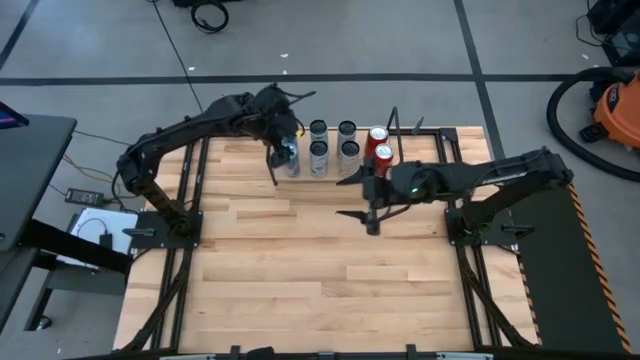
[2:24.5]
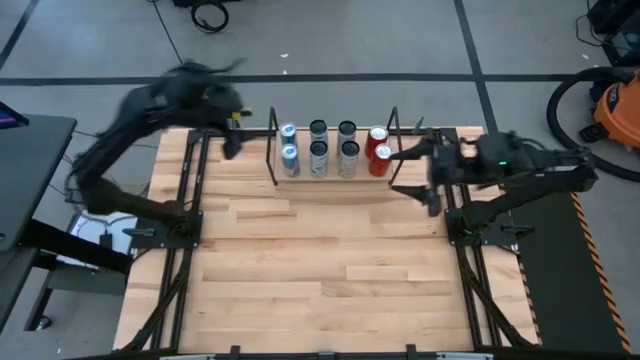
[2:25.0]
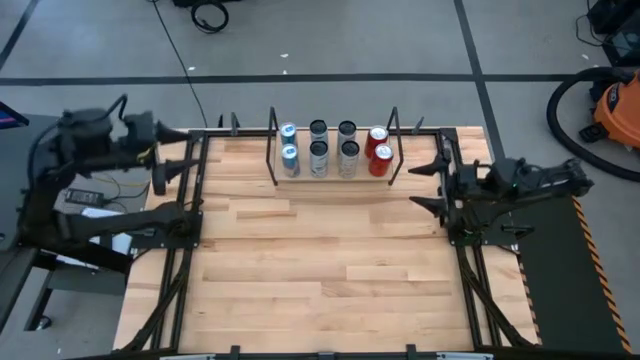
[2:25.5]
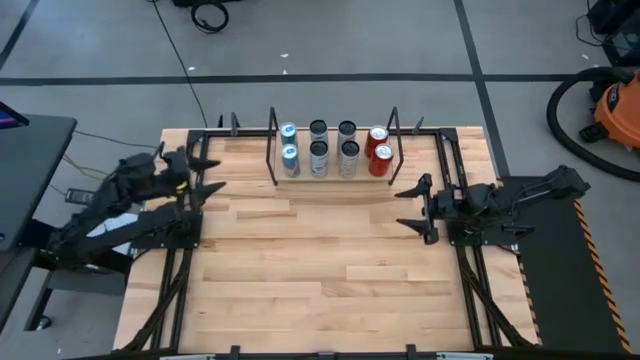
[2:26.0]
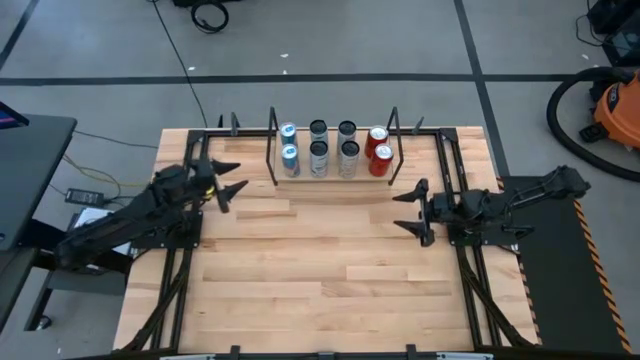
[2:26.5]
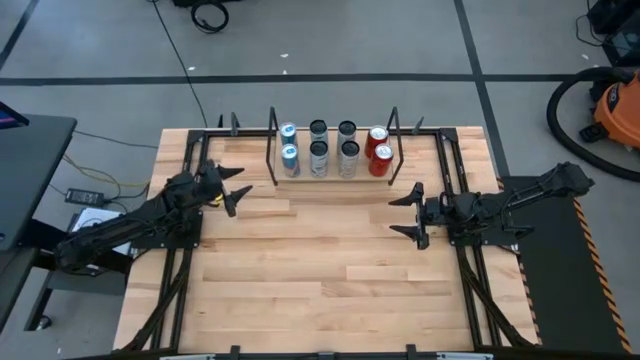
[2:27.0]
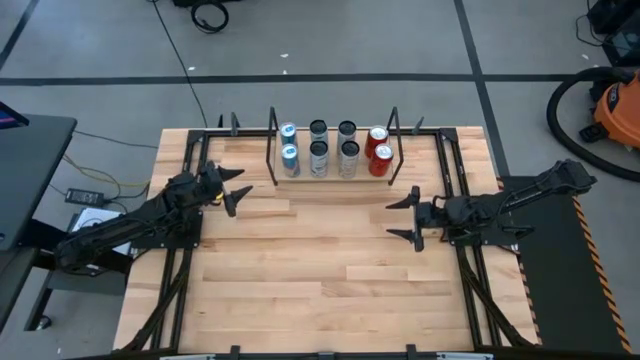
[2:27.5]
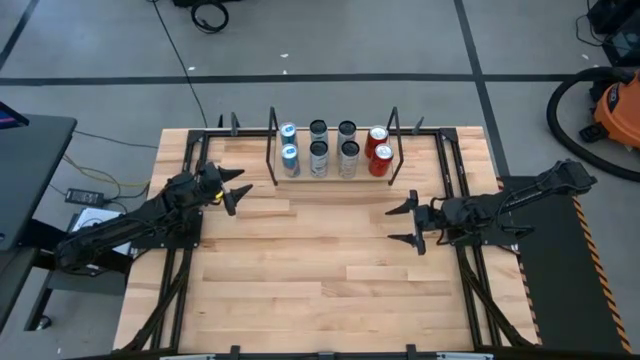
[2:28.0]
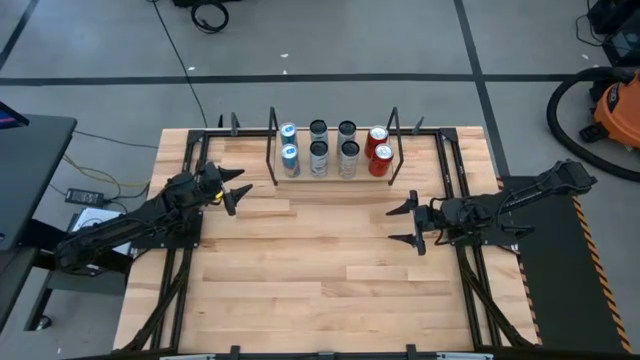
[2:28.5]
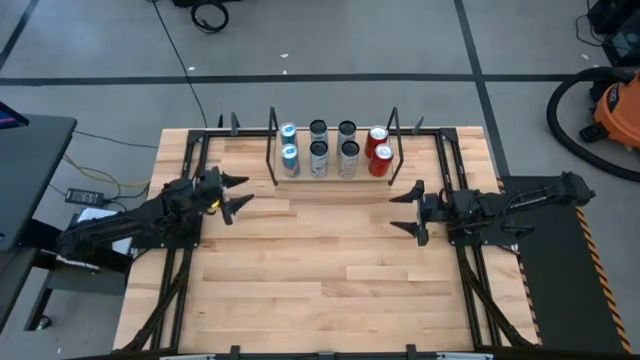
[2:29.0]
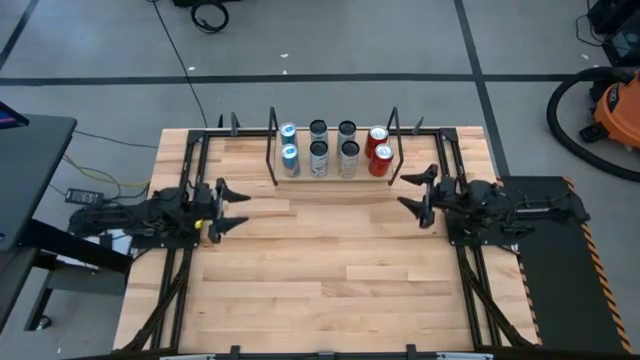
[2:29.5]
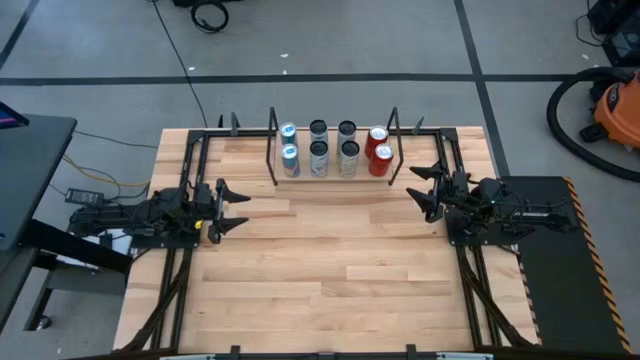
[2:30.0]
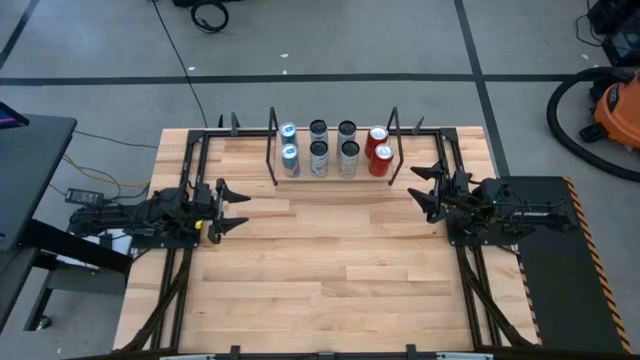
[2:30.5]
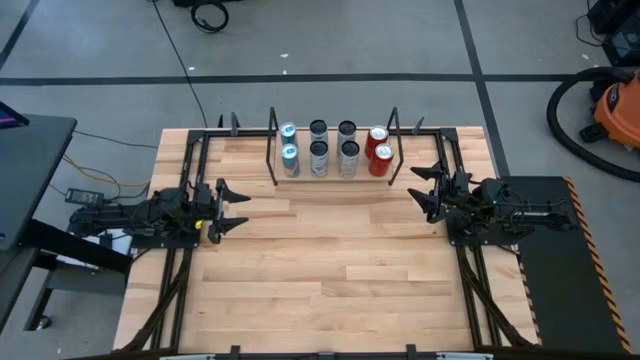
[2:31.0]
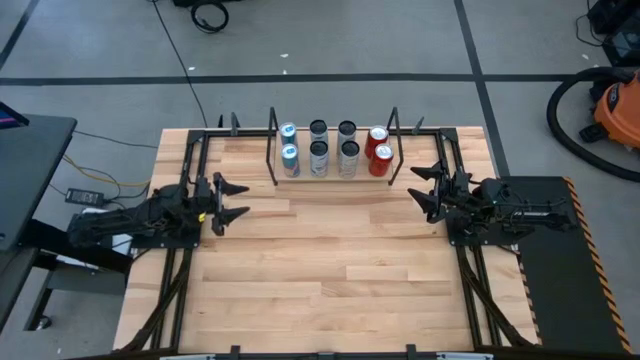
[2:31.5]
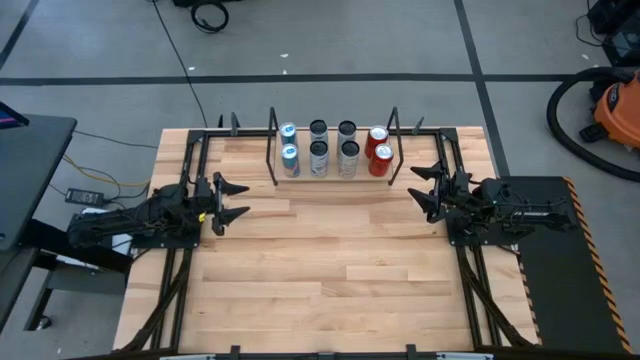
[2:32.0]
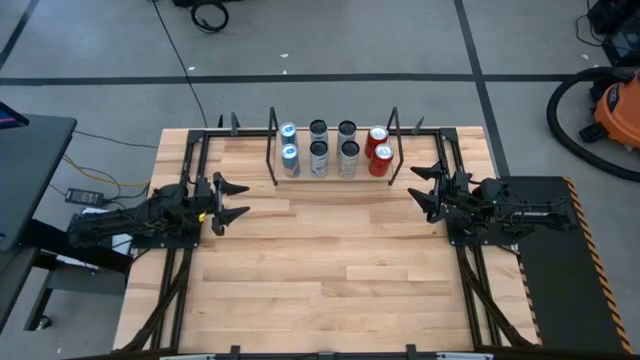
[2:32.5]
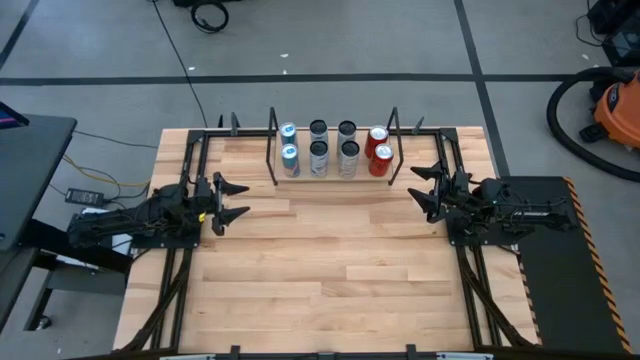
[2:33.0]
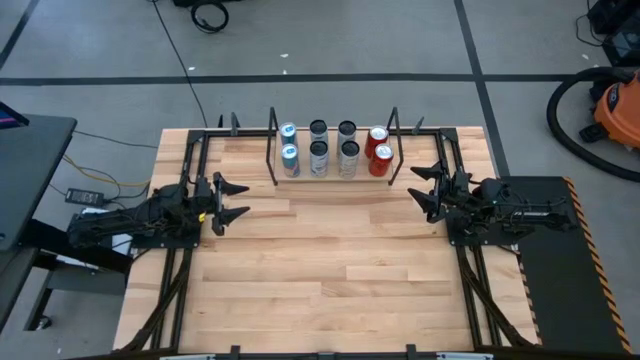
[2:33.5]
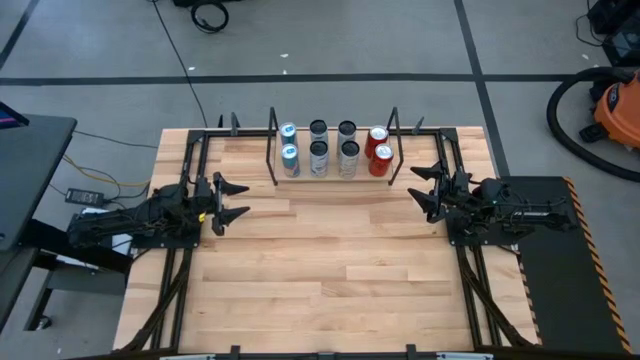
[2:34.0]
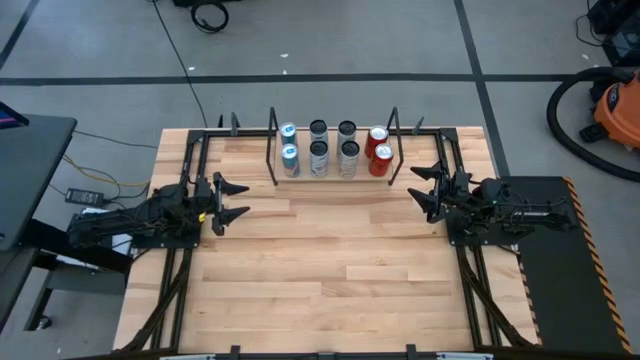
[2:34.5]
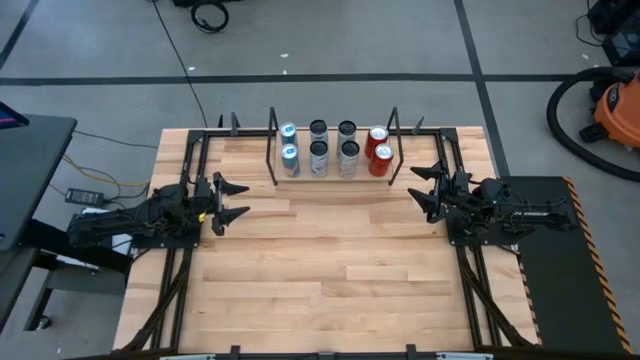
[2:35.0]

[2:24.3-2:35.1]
Task: Place canned beverage on shelf
Return to Home Position

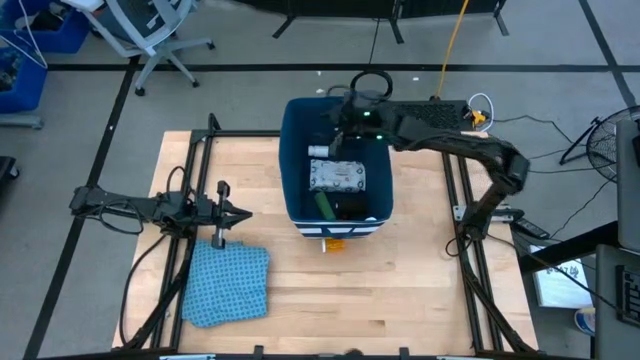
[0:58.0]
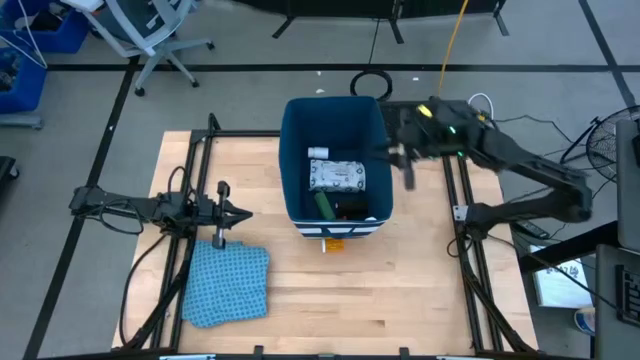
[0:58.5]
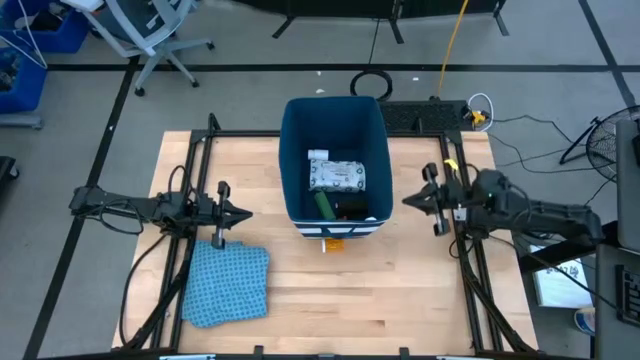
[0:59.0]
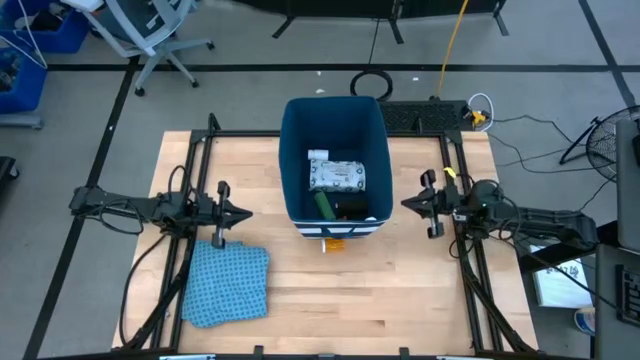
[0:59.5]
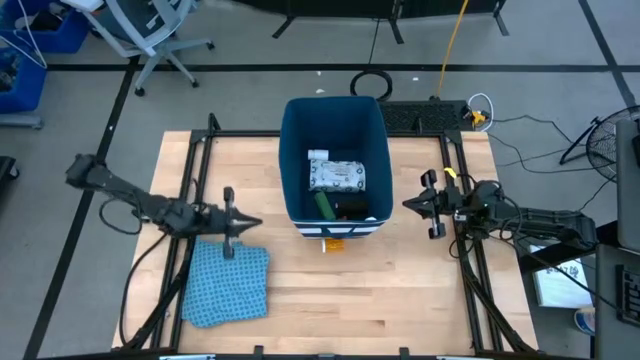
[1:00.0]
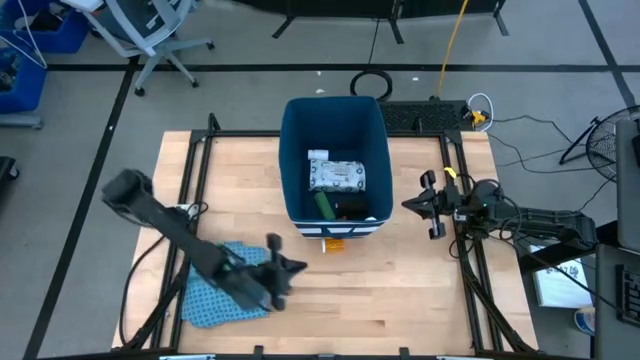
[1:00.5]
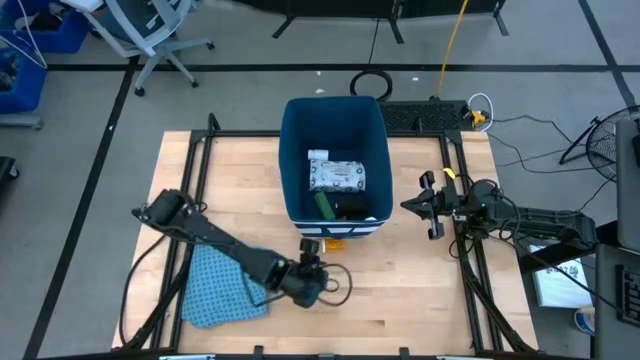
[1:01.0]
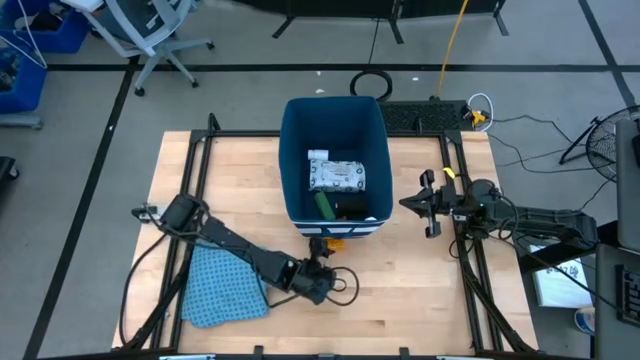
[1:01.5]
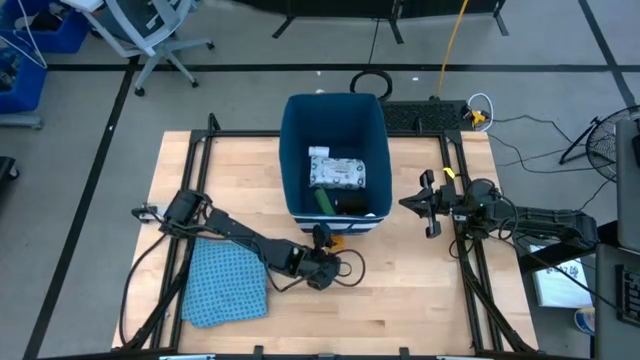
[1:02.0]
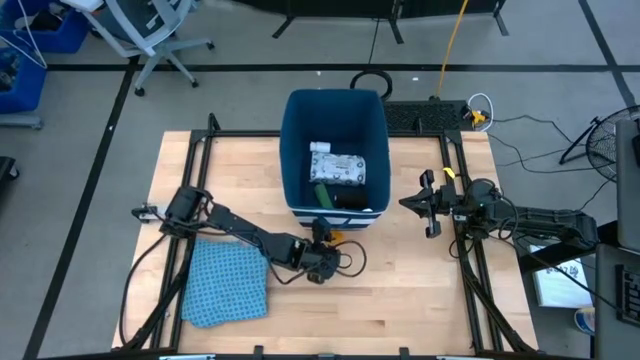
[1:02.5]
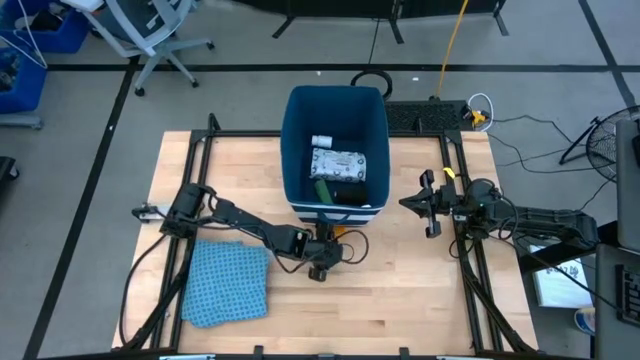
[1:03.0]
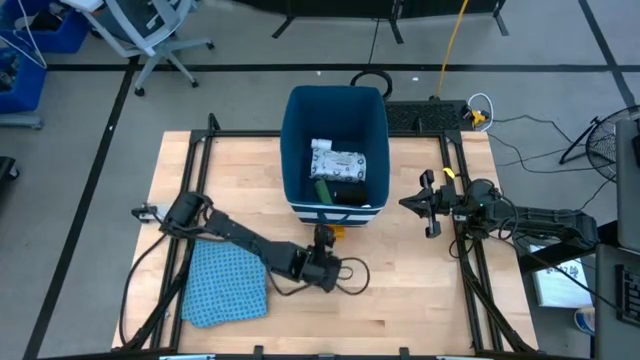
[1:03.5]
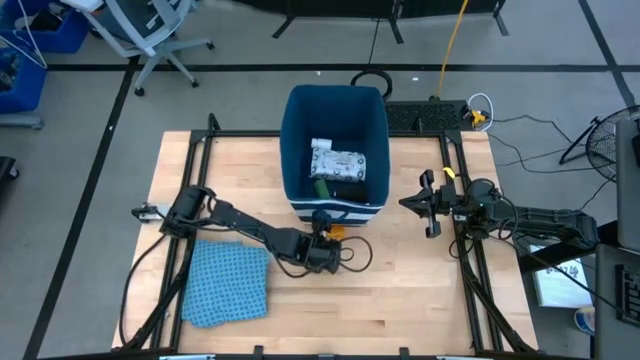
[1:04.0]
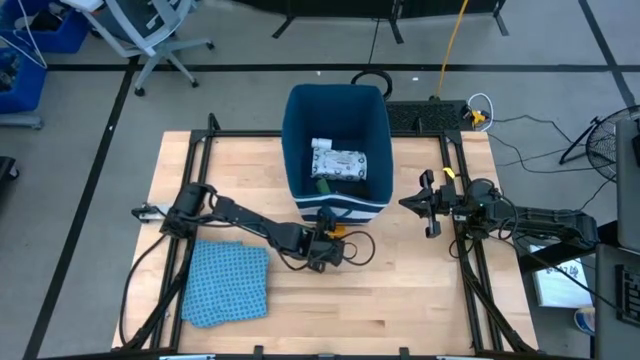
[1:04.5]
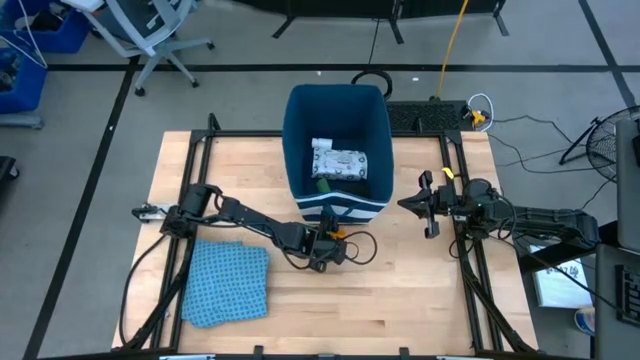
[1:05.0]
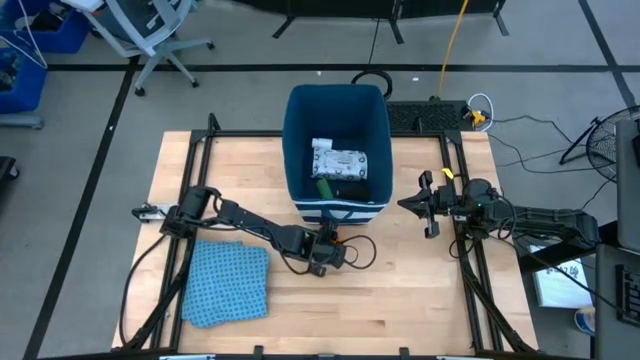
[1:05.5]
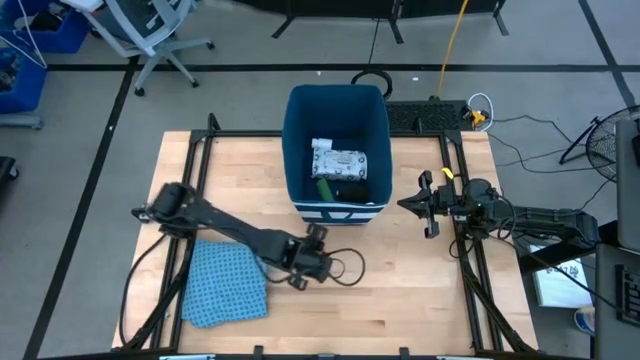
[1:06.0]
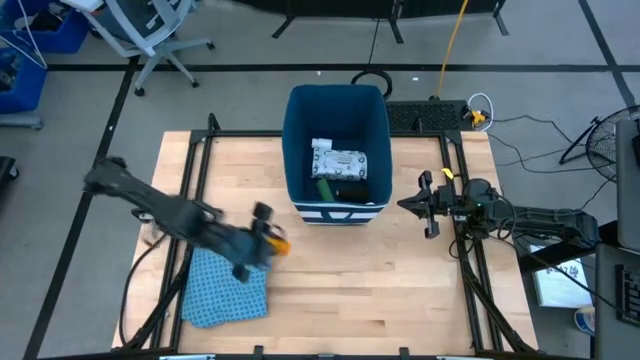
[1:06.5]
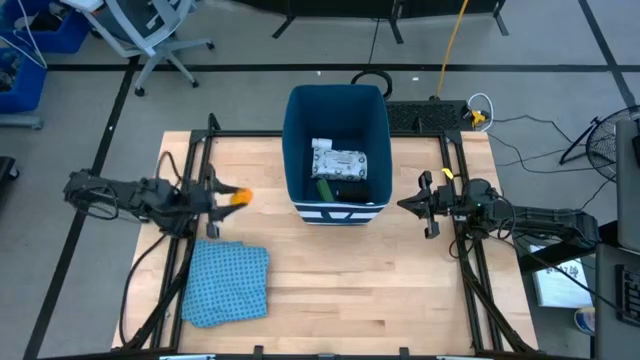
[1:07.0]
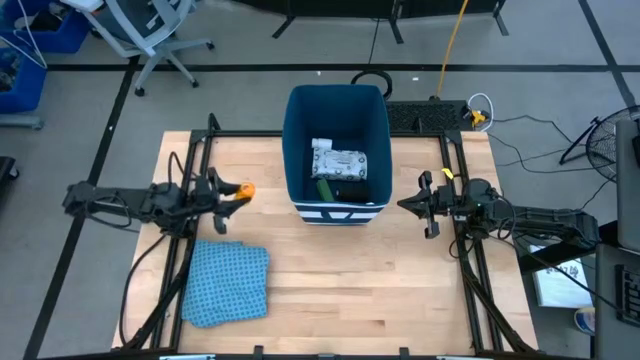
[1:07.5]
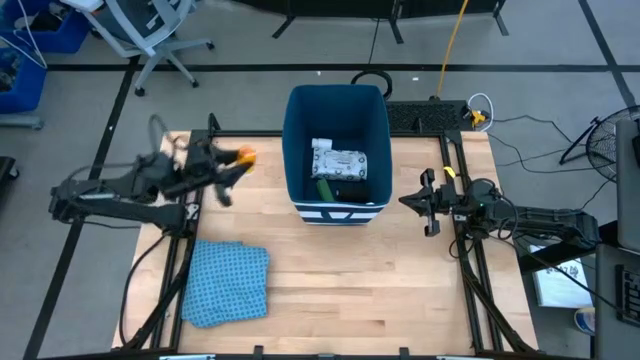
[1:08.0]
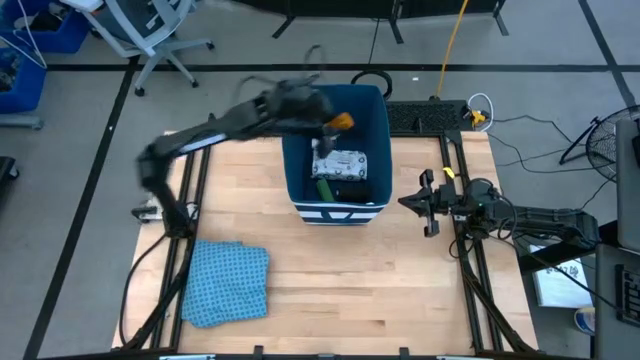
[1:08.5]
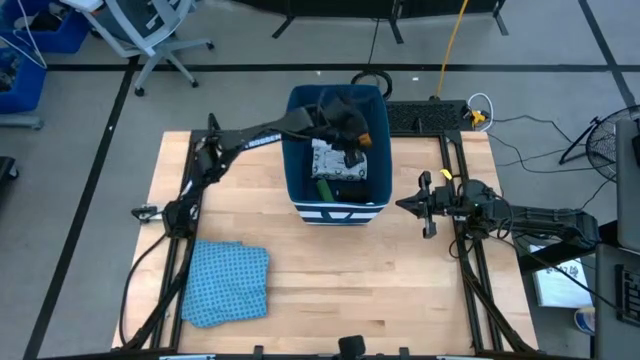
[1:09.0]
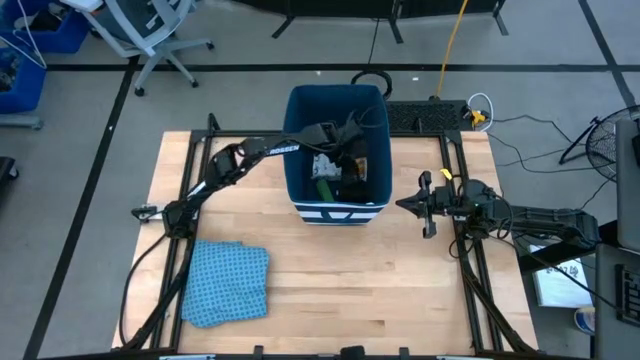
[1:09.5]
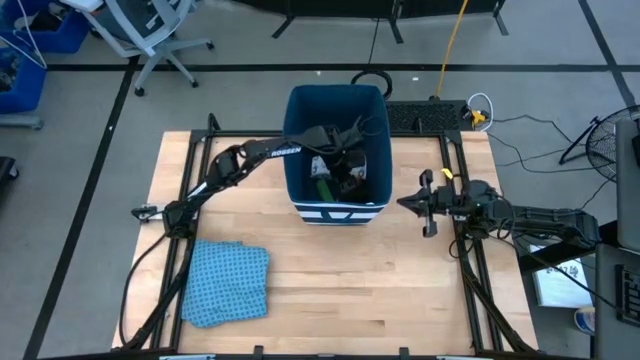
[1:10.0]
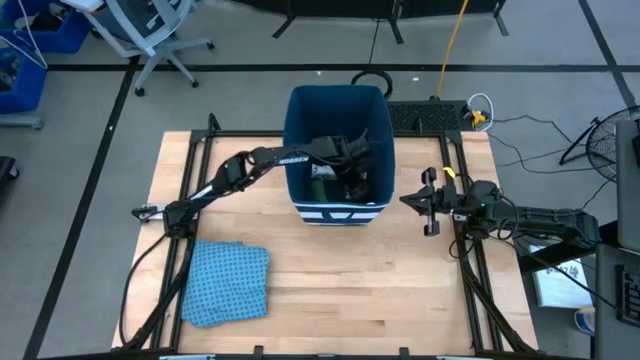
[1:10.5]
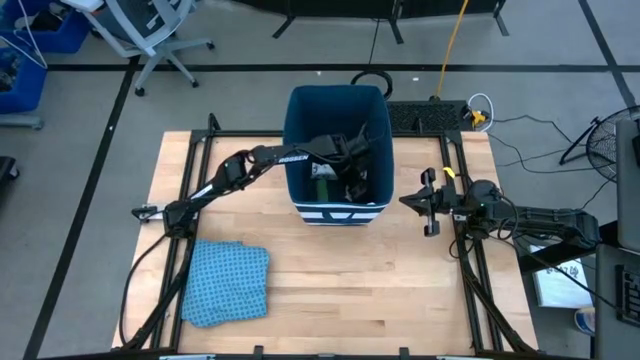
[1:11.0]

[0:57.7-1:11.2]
Task: Pick & place medical supplies in basket/bin
Put the orange pill bottle into the blue bin
